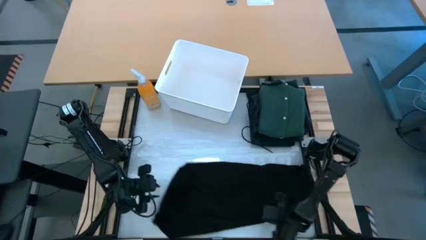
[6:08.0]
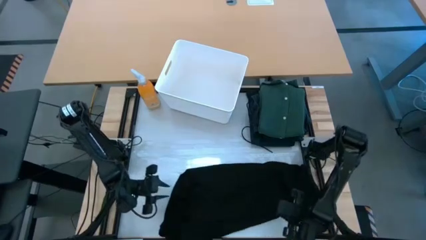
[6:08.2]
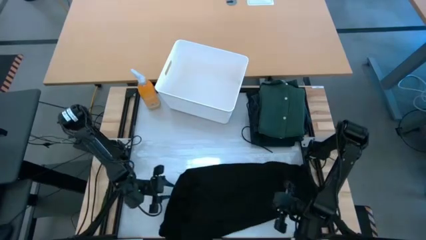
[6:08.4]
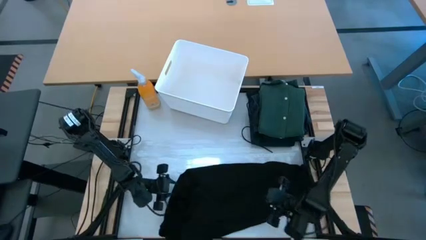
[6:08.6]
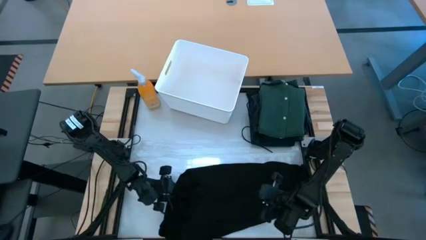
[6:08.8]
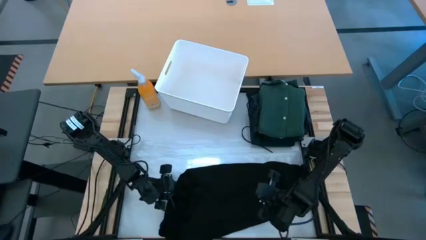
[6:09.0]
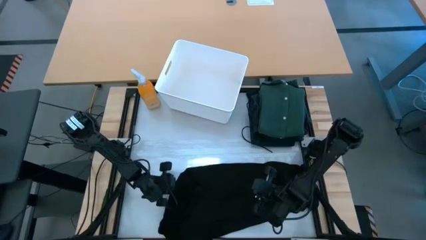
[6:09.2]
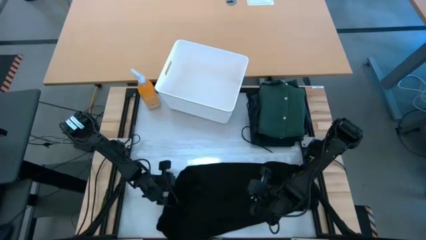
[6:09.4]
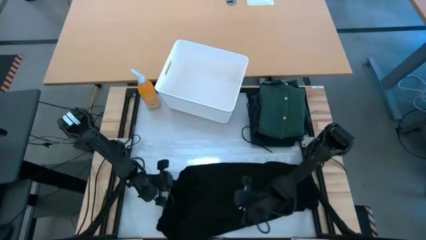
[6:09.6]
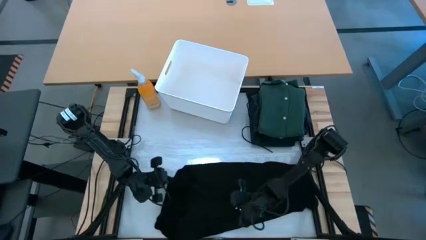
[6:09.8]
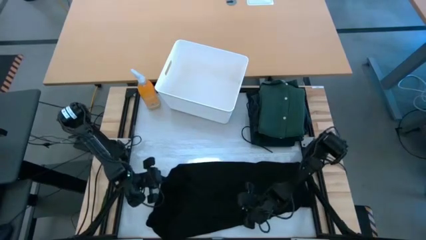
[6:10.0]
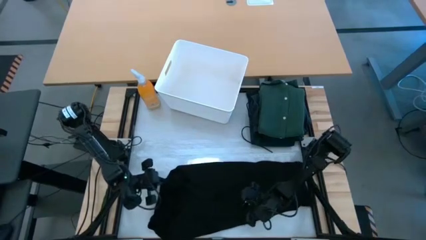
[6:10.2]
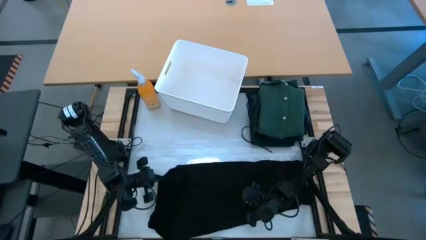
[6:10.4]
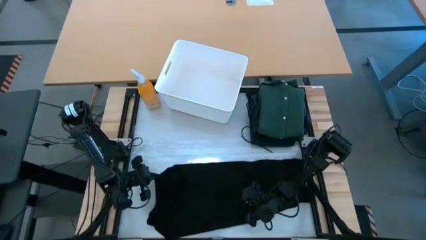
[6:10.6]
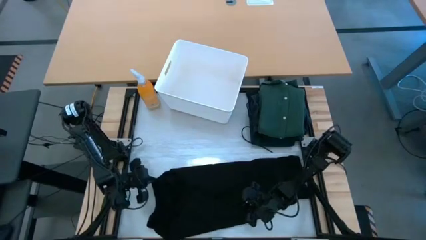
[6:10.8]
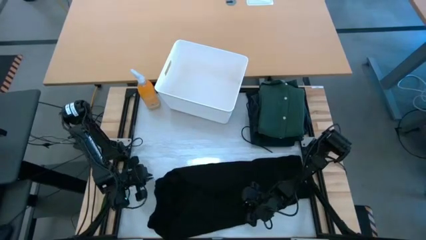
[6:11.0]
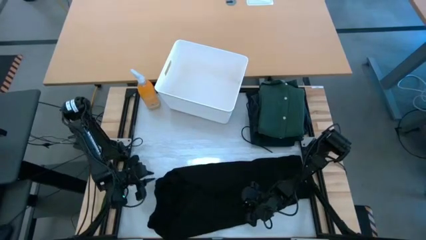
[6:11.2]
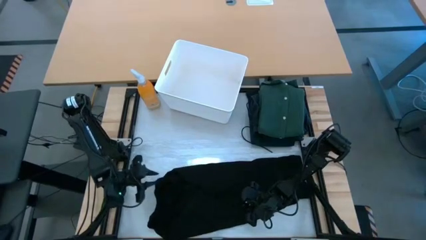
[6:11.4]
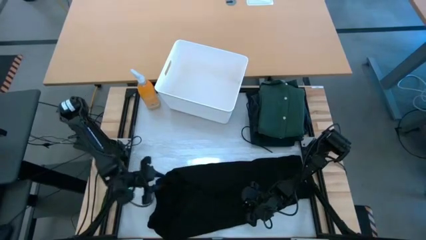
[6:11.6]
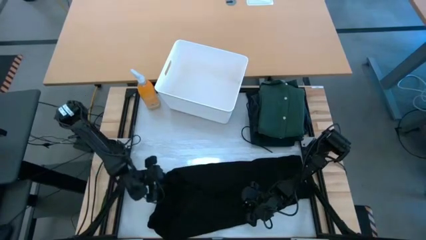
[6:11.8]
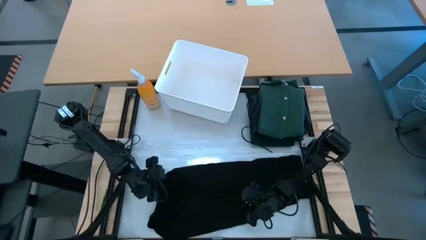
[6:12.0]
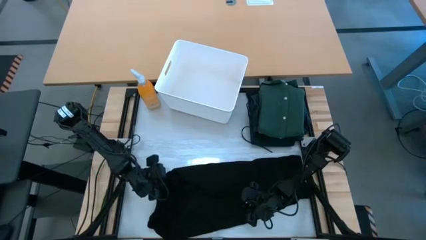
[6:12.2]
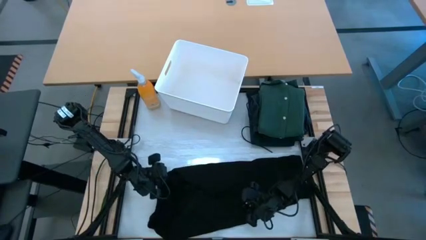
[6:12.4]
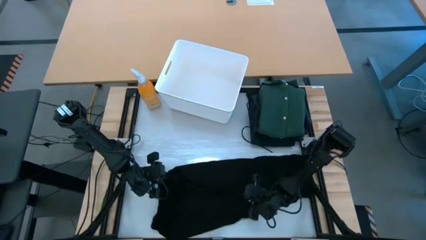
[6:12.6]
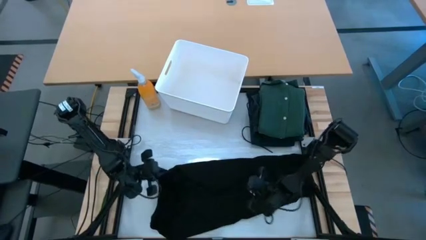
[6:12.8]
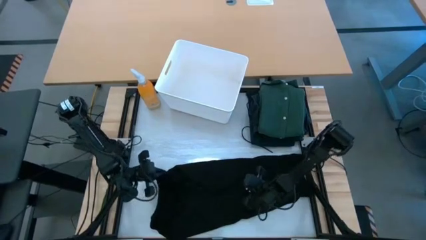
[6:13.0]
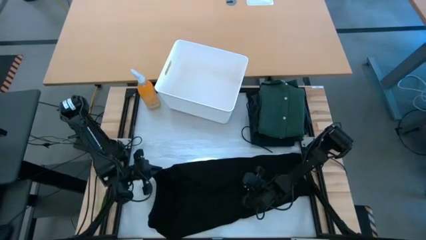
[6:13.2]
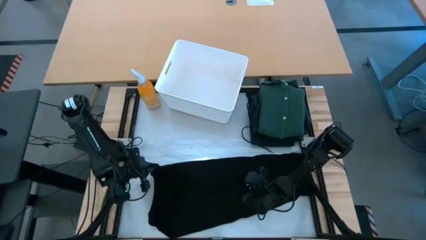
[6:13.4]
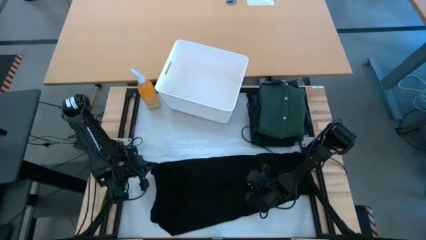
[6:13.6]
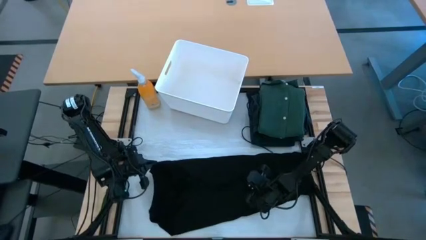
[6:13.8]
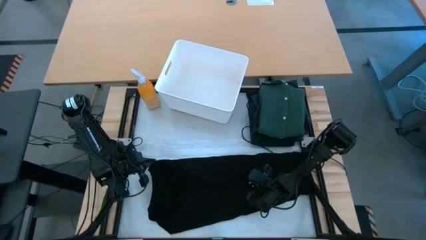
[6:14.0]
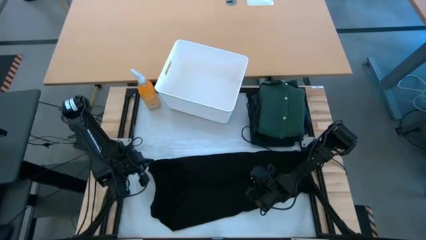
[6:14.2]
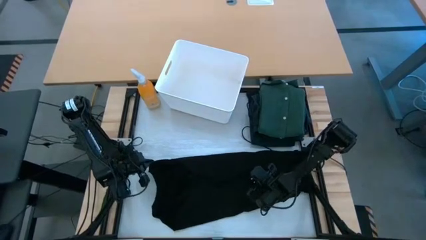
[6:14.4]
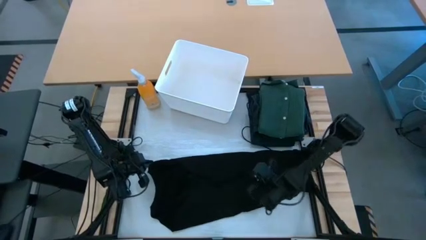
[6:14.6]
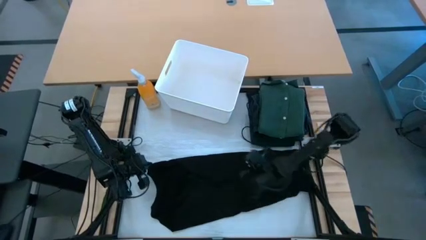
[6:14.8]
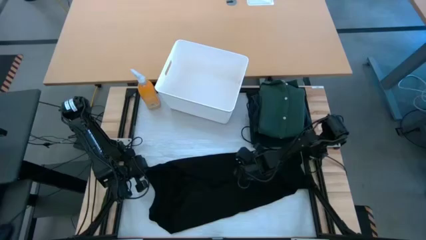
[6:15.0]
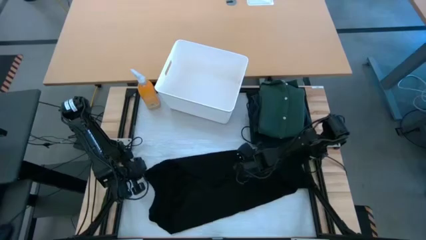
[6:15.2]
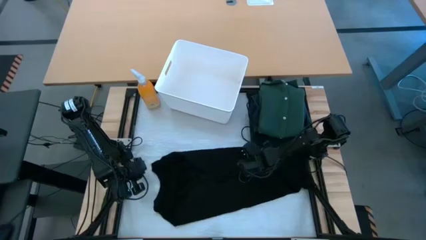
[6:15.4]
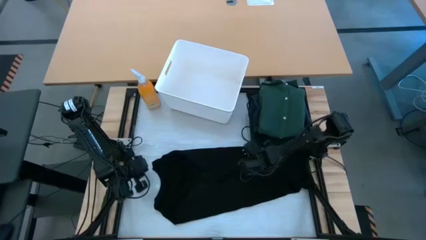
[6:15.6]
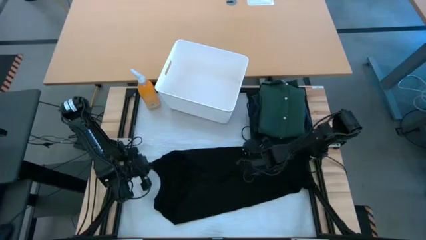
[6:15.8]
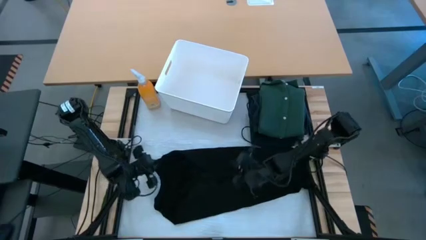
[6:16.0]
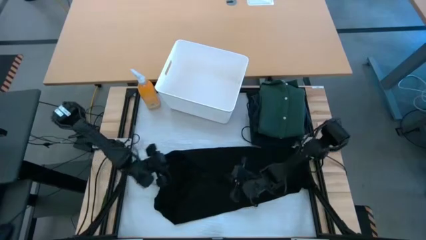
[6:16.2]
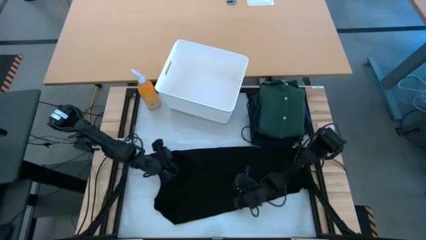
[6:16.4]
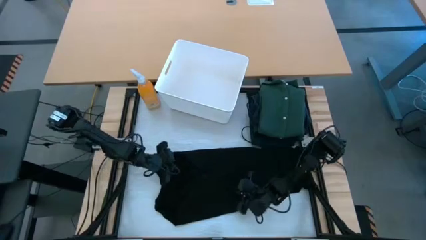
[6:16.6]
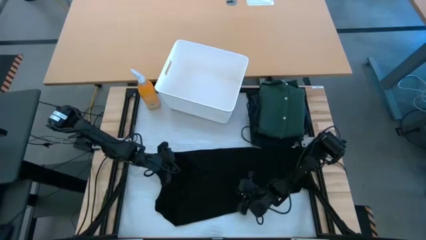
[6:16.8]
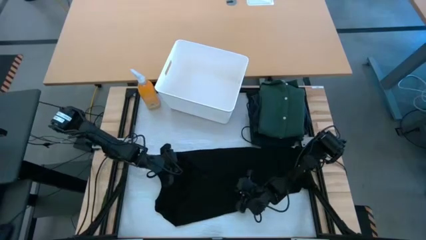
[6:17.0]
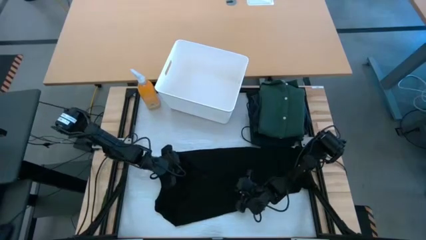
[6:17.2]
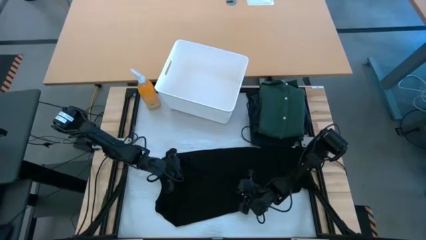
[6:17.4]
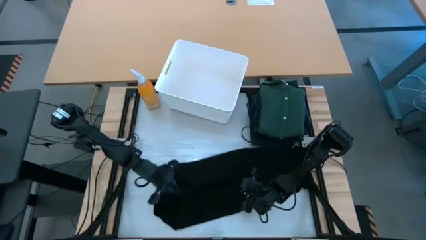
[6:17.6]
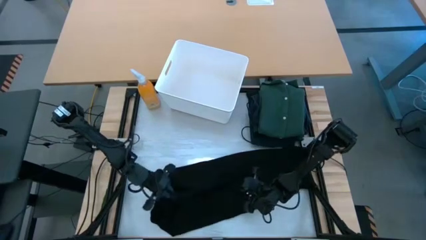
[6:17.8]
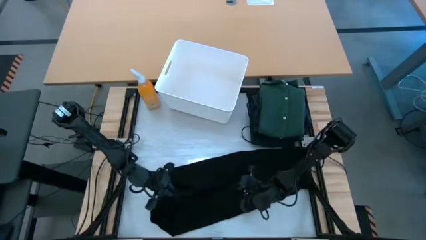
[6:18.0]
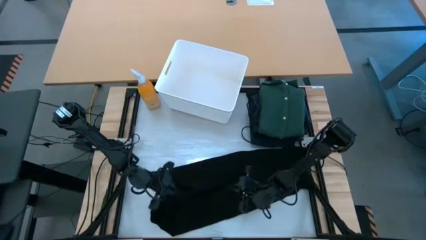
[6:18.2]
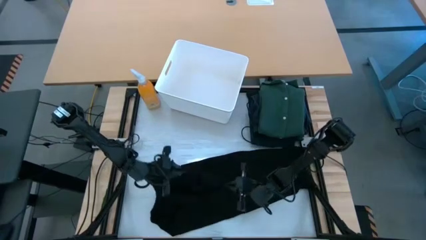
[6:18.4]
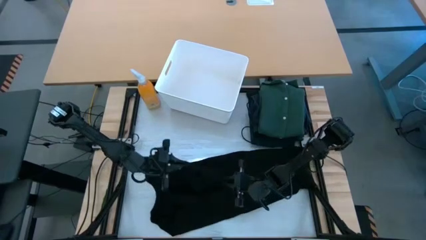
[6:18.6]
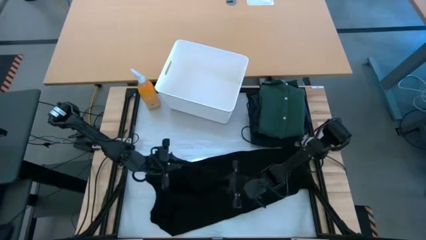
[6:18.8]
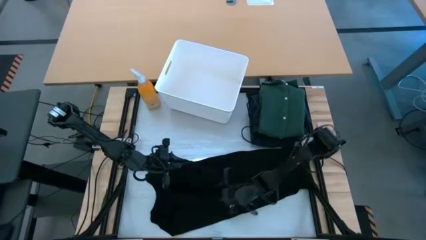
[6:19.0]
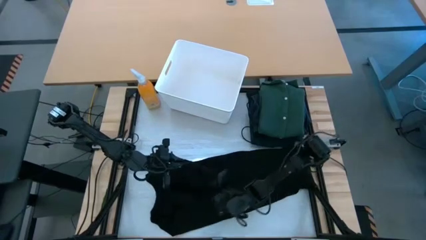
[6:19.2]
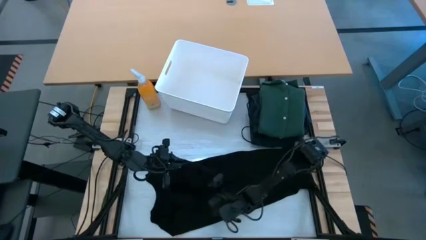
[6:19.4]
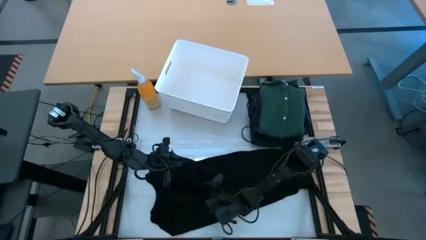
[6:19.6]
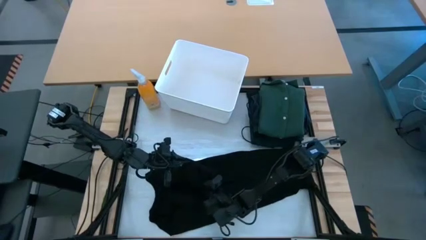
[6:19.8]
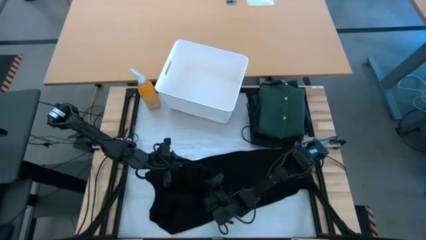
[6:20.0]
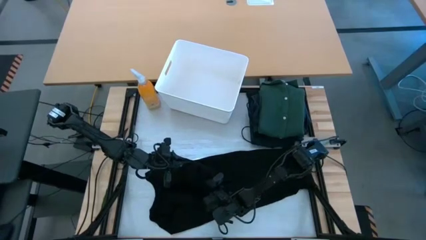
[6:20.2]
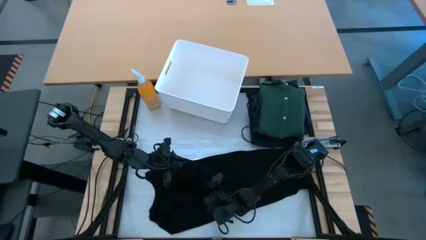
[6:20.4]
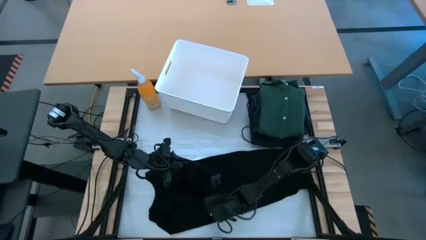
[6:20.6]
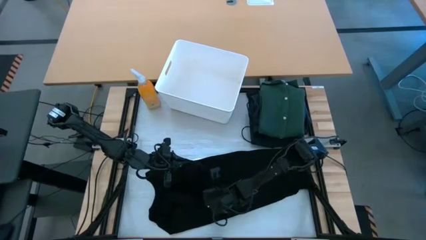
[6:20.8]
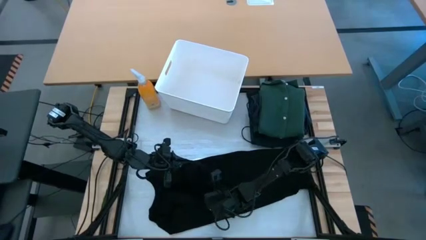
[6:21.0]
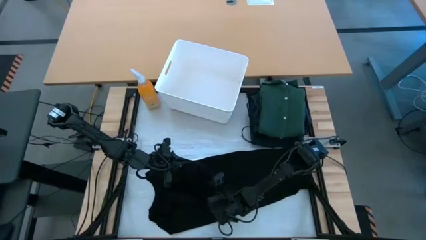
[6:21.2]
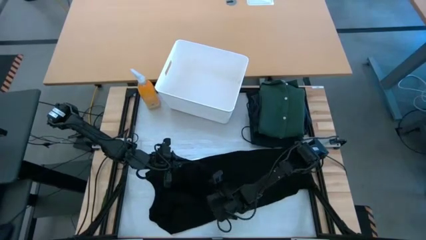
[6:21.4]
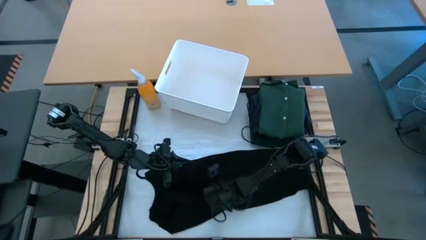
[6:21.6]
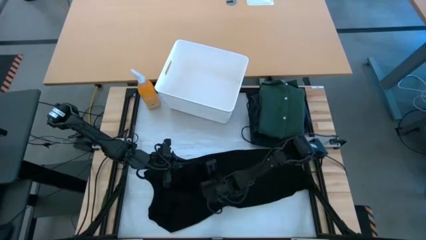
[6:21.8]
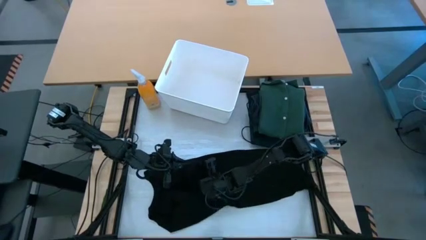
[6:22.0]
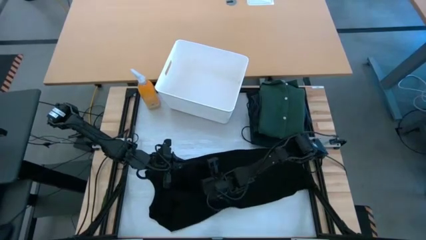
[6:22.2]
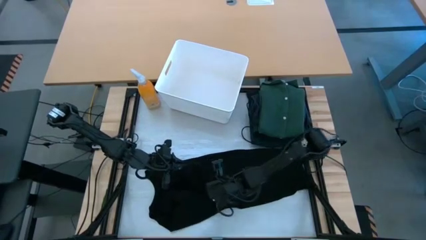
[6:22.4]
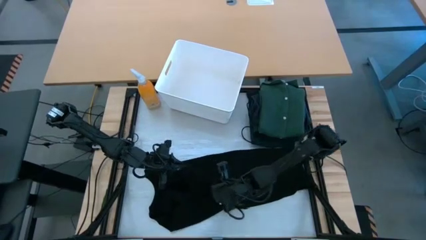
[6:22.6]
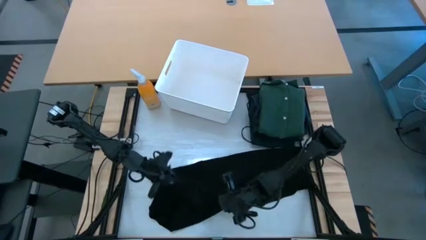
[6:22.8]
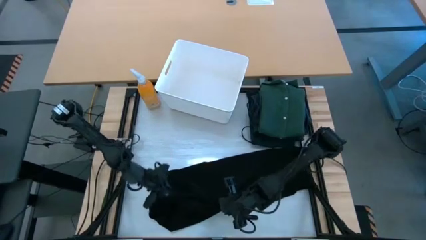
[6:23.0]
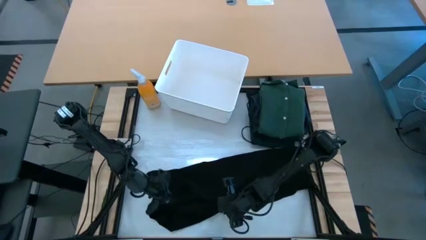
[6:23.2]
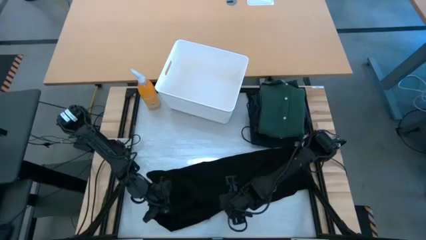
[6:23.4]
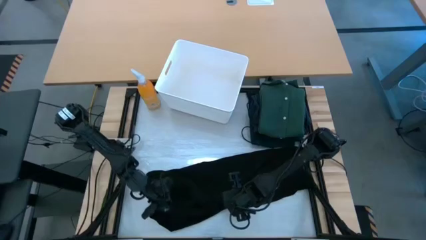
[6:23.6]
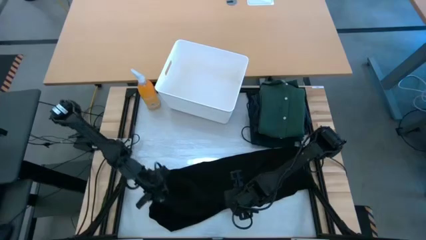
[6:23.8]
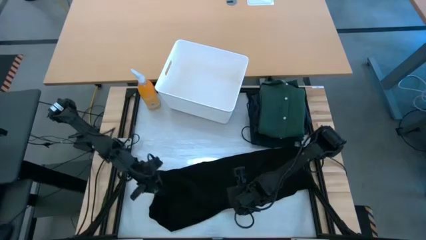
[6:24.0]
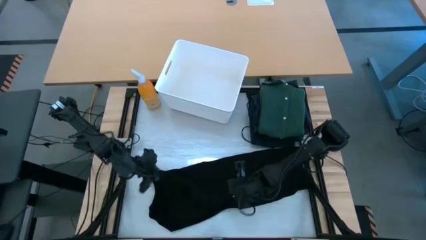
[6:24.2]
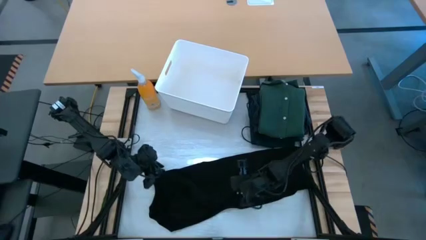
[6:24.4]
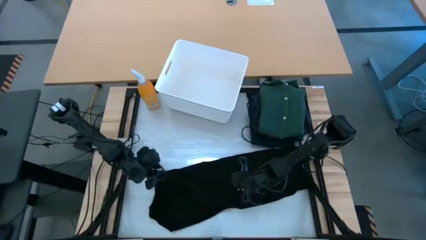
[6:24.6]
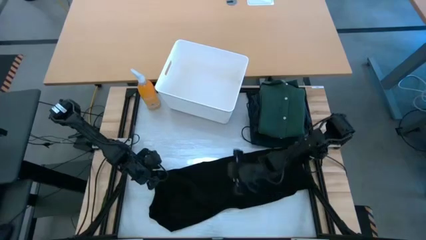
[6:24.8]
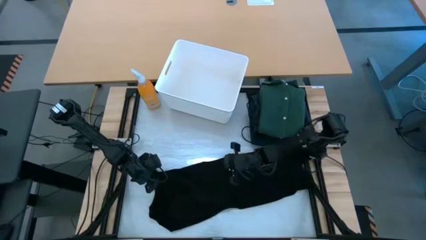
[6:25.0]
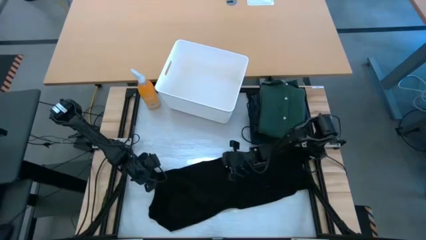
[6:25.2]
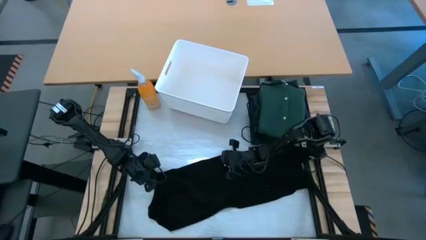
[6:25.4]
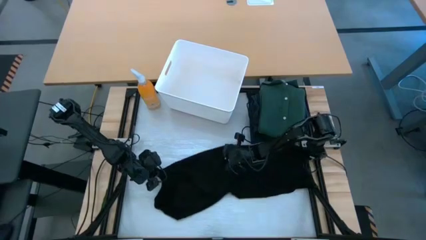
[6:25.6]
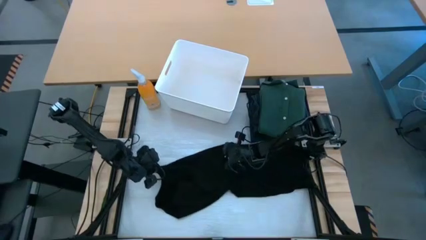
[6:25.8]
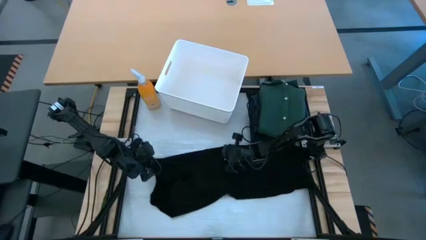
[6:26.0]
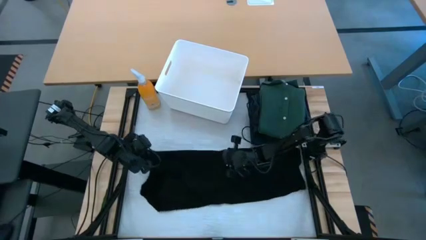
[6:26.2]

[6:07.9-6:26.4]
Task: Fold laundry
Fold the black shirt
